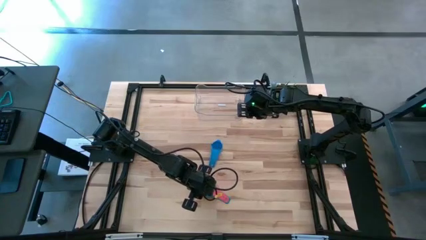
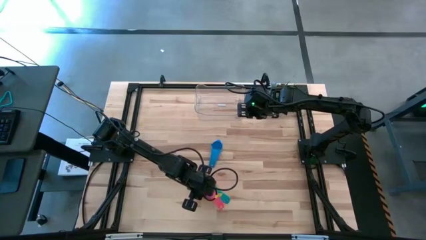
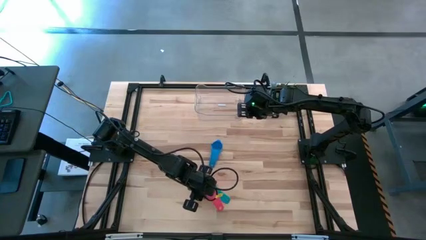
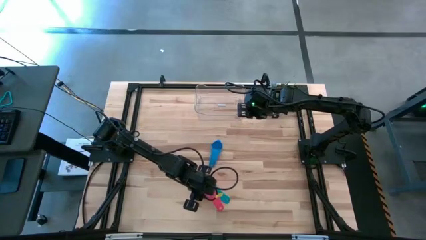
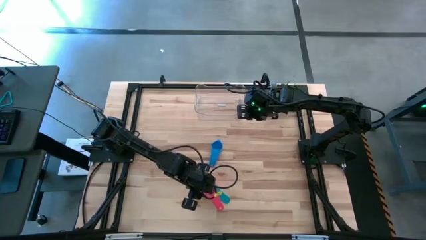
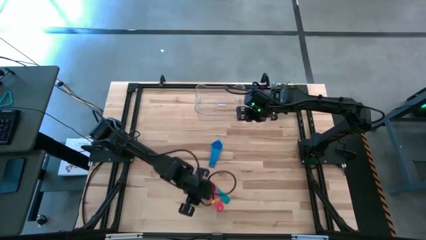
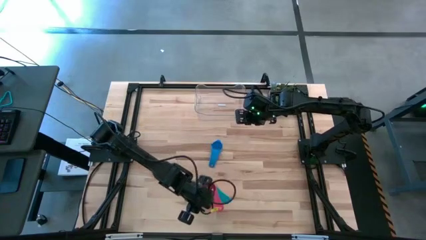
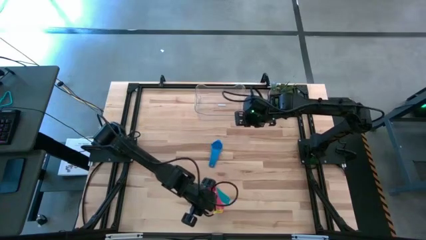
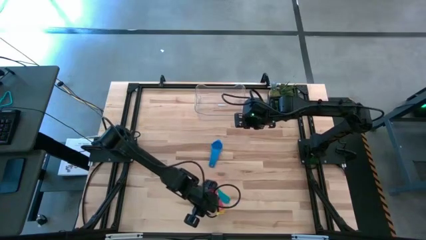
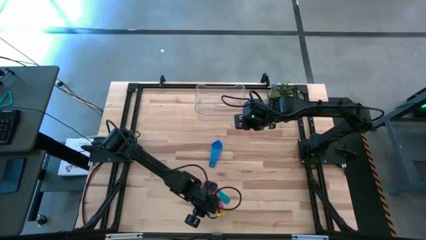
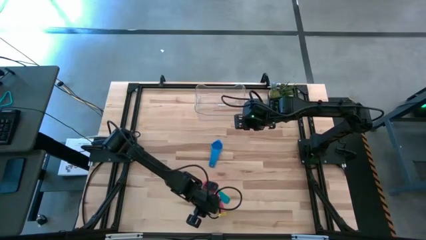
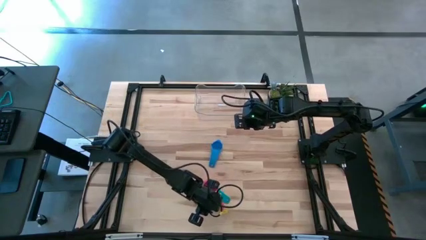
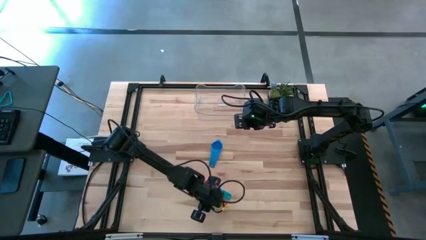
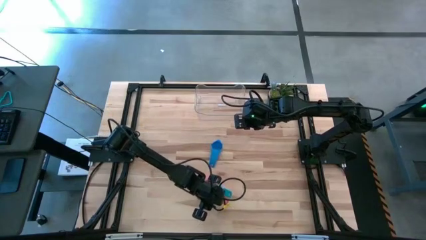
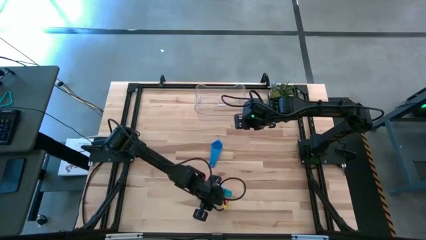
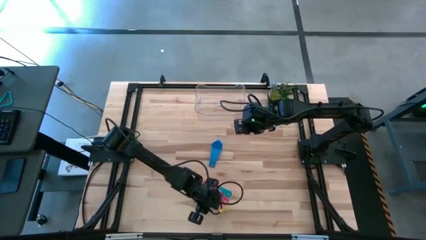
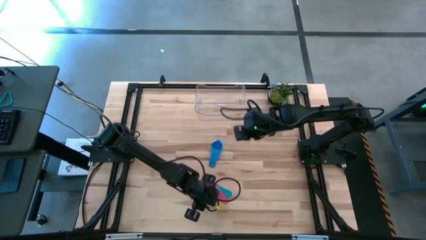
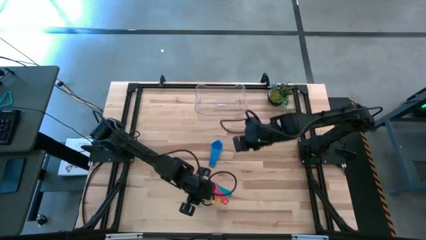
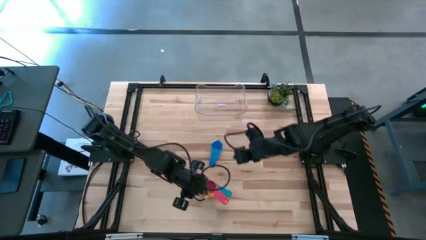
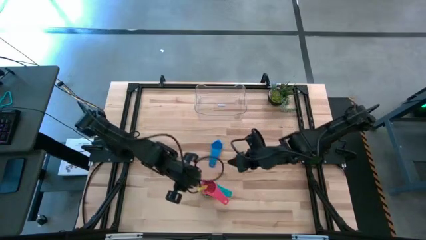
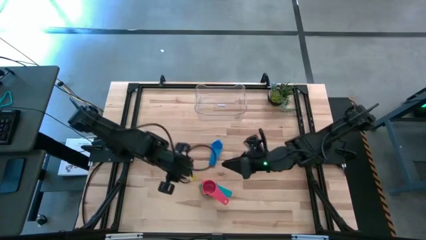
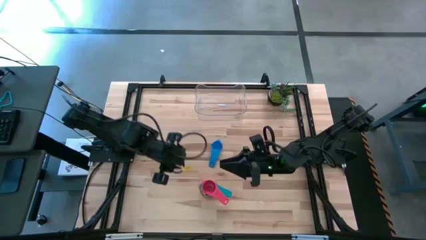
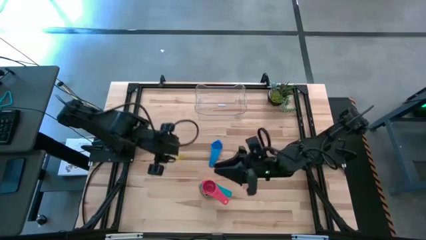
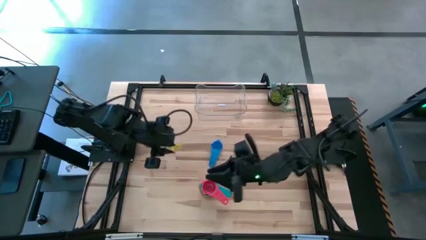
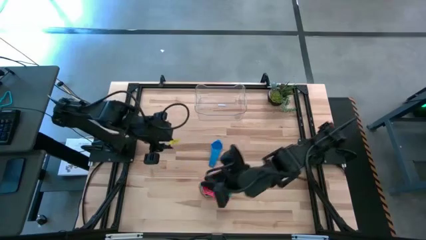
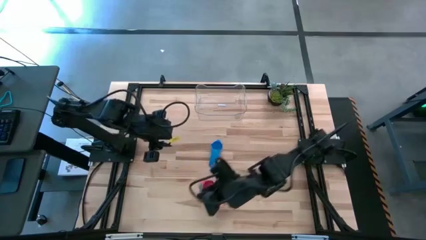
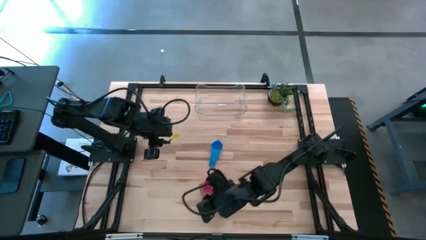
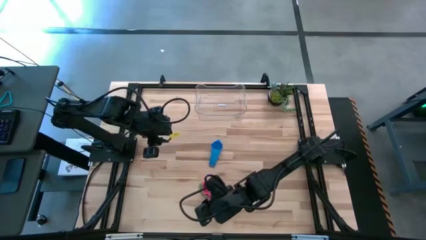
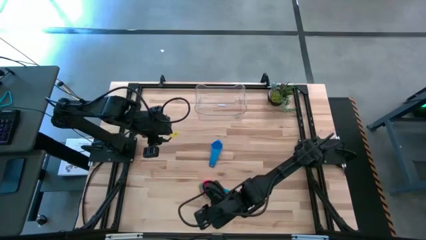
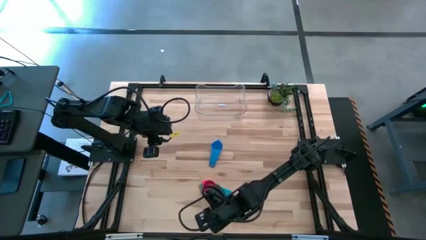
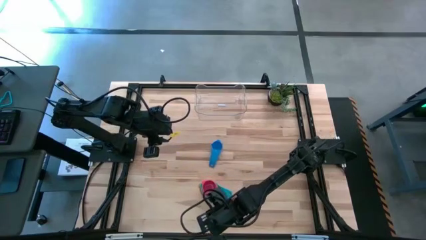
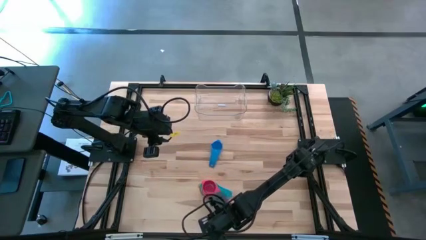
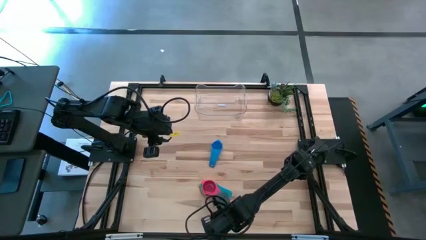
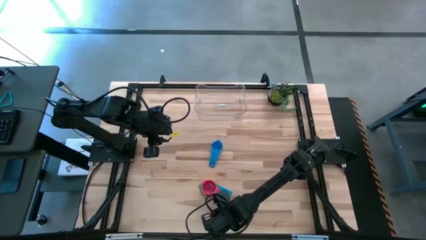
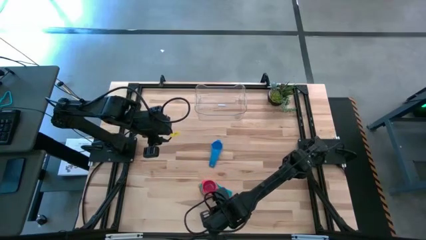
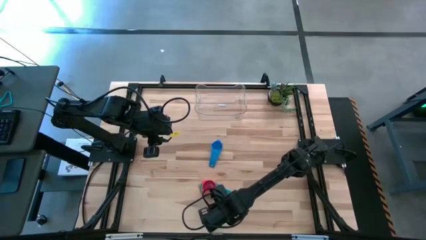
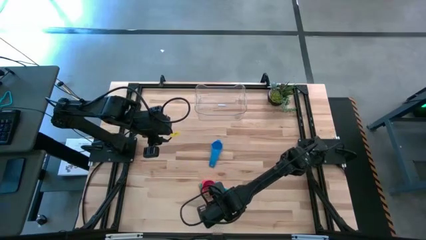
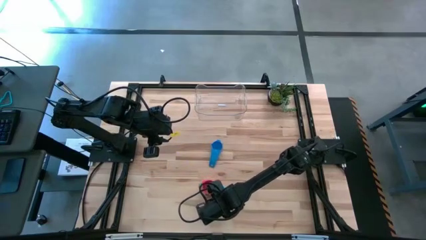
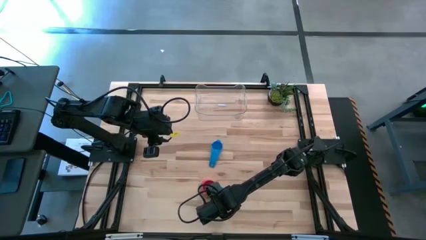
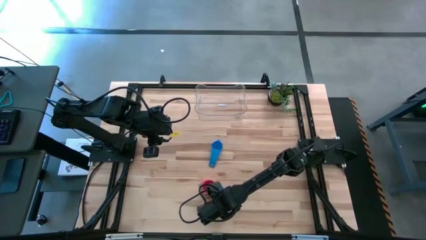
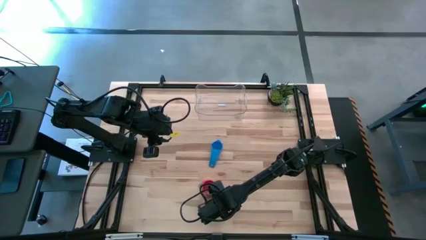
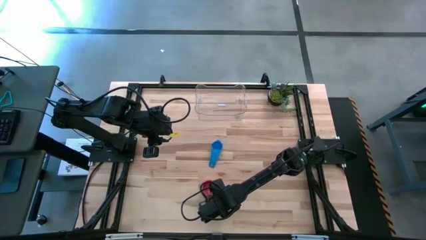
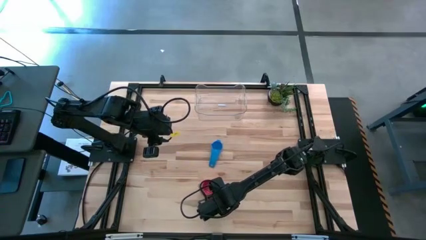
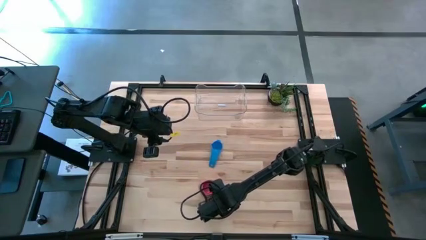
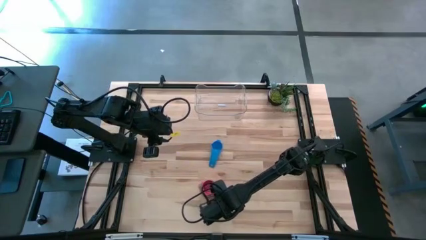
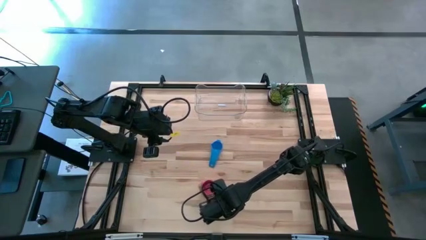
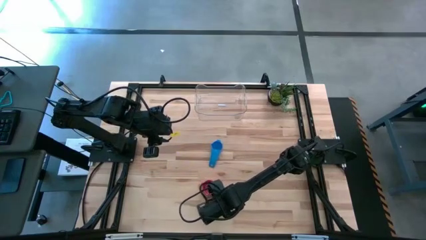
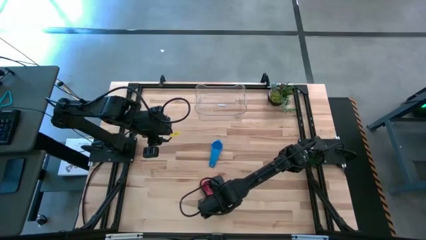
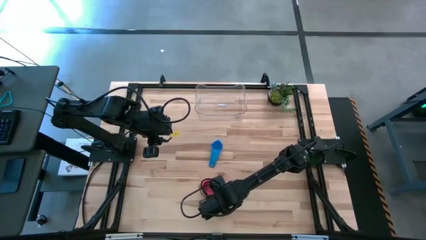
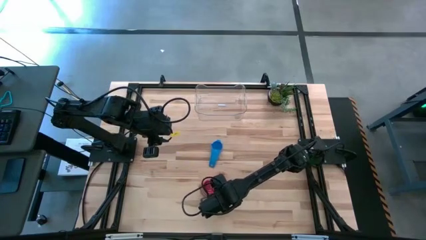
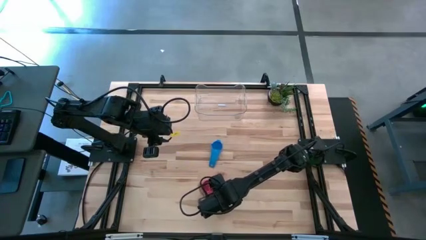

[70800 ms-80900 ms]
Task: Nest measuring cups in basket
Stack the red measuring cup in the light blue measuring cup

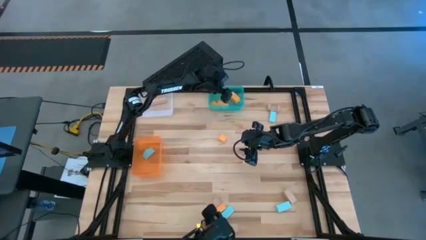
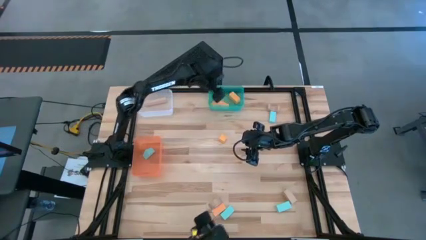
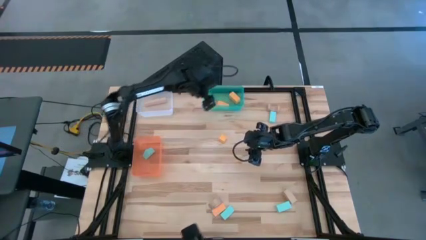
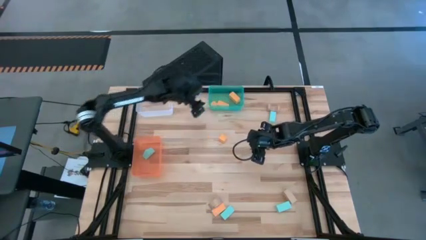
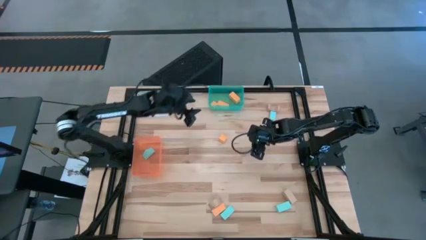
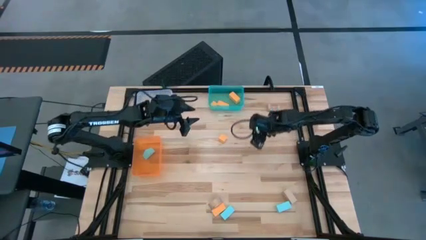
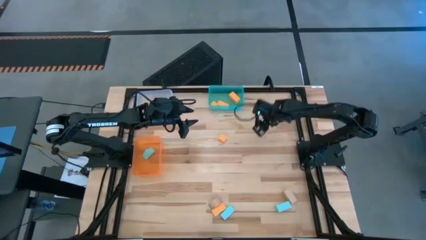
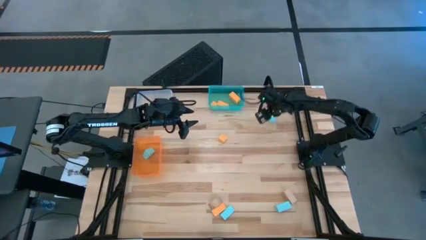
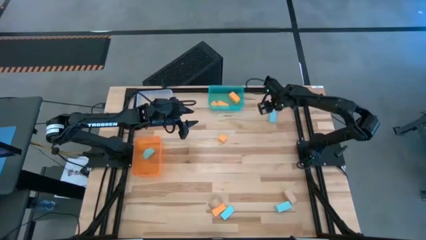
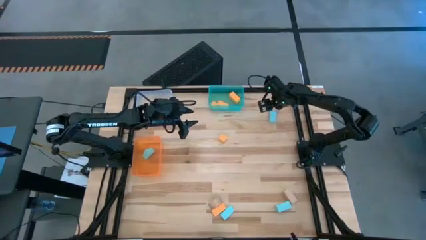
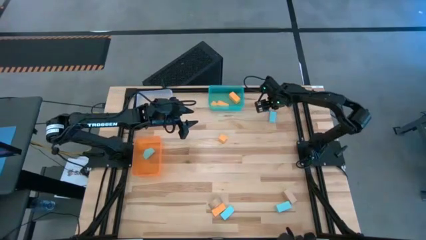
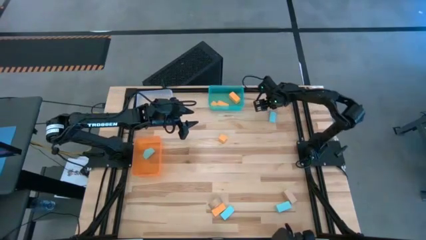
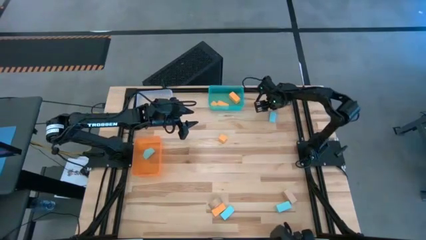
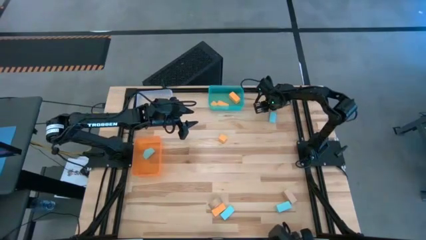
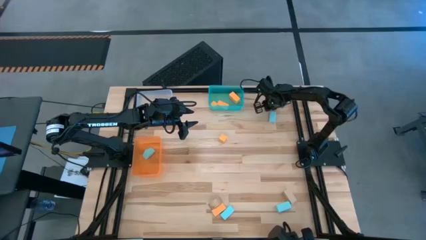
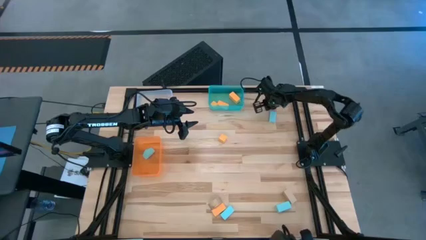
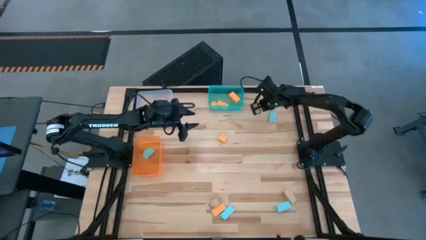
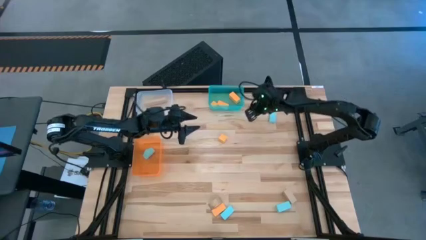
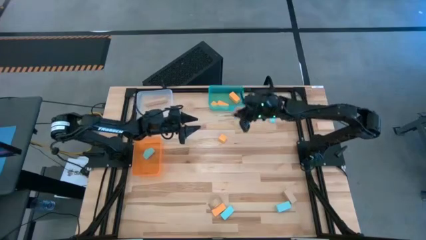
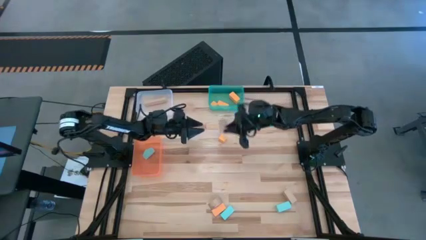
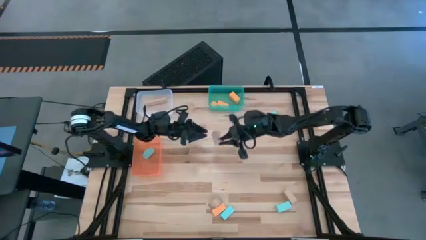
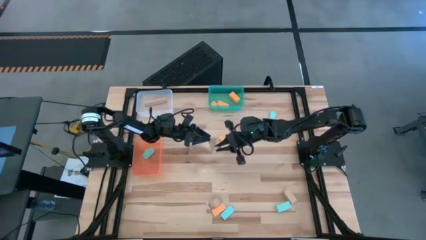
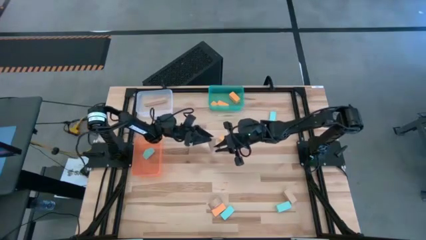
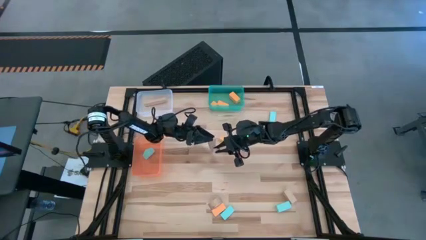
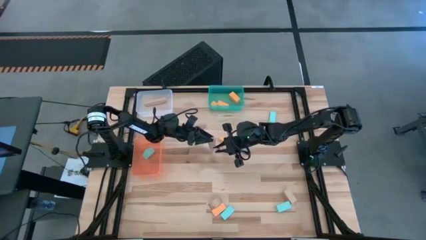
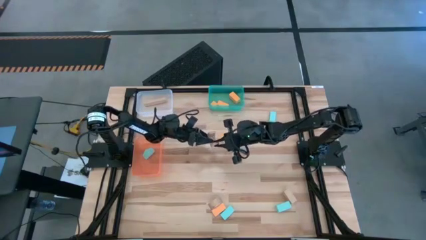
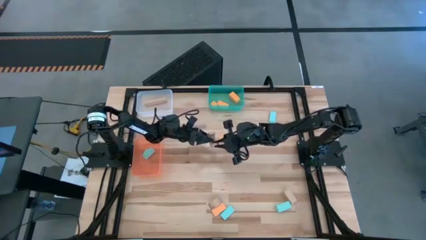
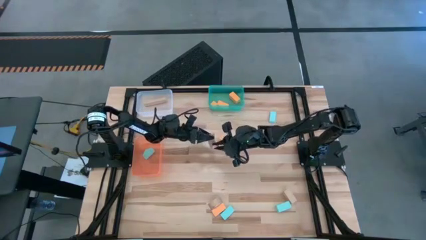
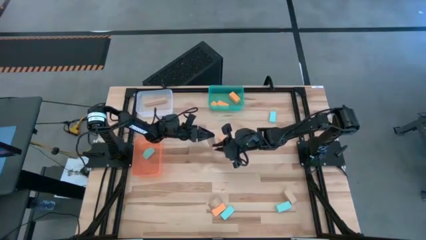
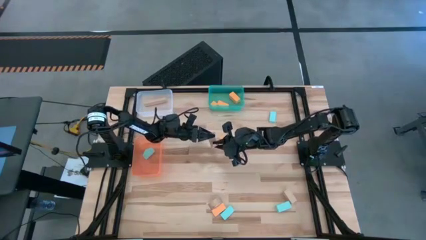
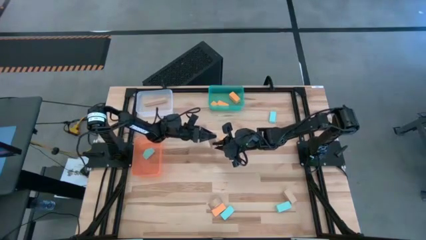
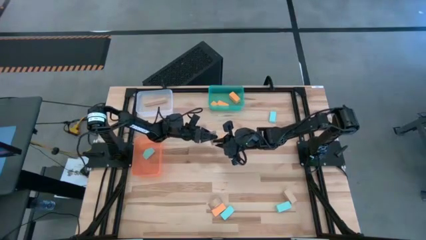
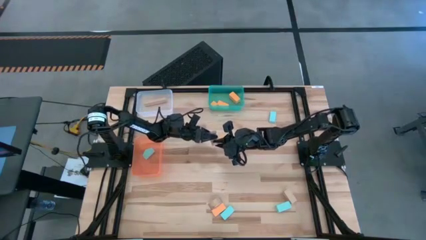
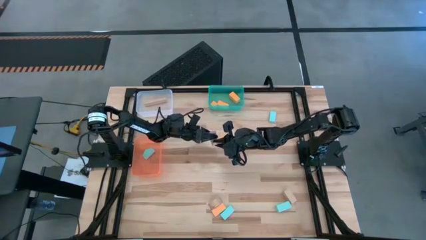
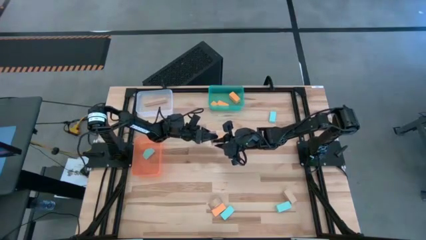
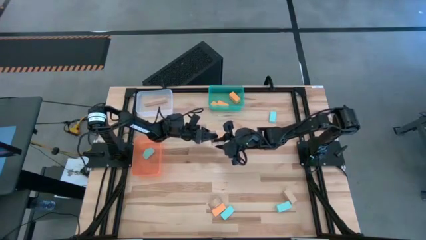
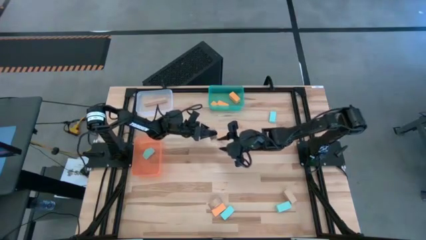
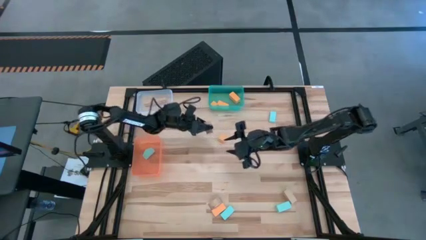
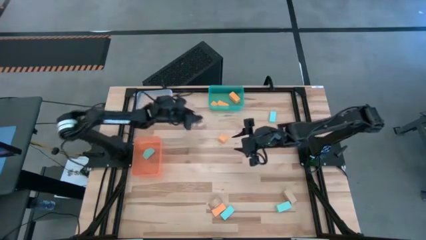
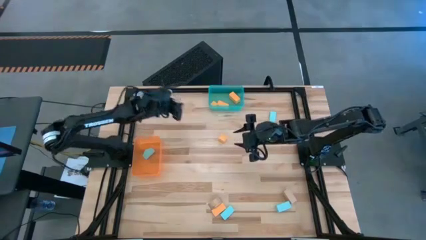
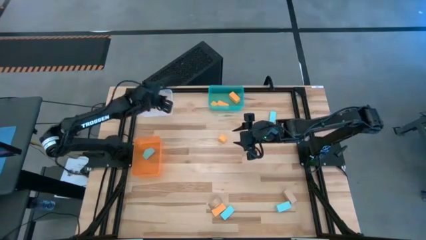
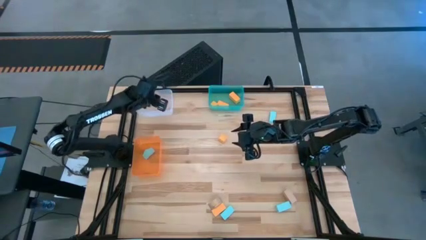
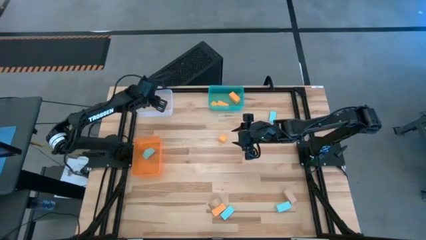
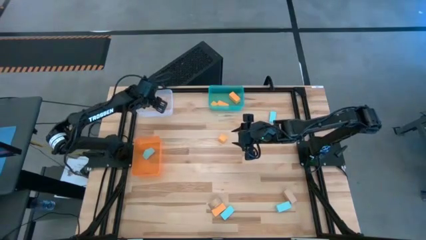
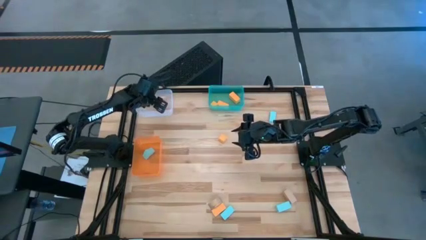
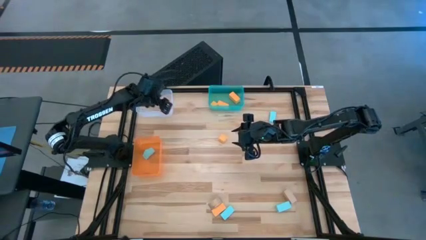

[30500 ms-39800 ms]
Task: Sort & place blocks by color
Put the light brown block into the white bin
